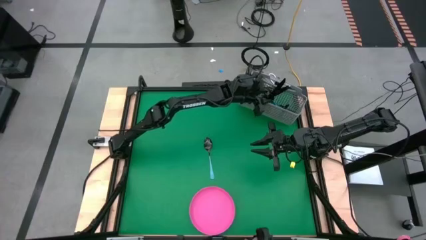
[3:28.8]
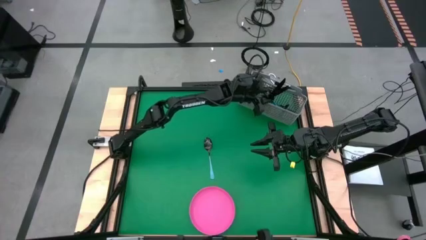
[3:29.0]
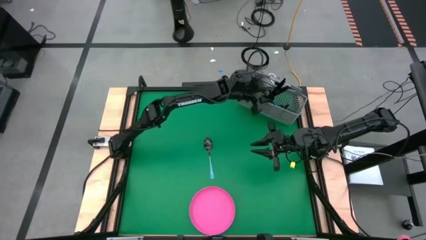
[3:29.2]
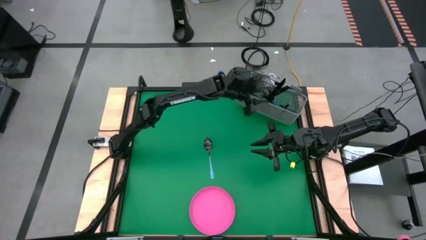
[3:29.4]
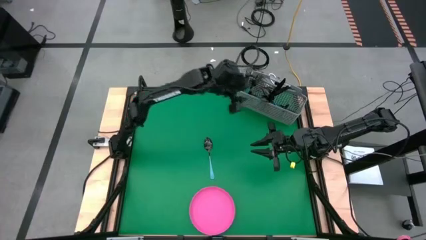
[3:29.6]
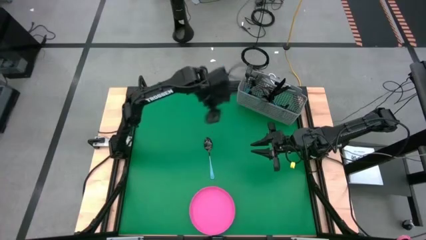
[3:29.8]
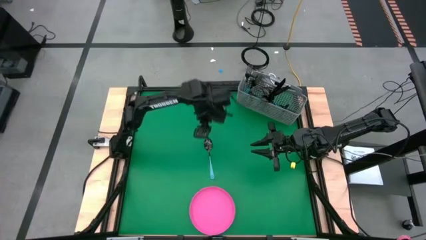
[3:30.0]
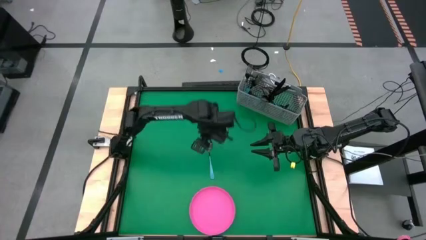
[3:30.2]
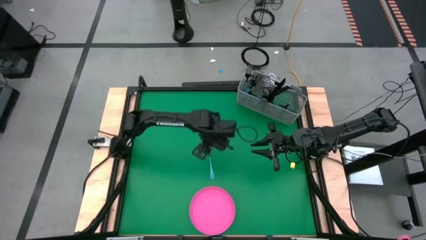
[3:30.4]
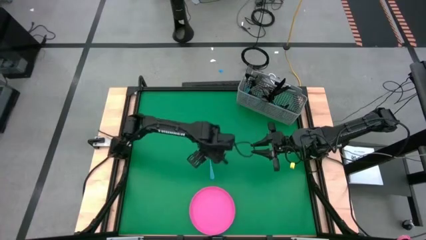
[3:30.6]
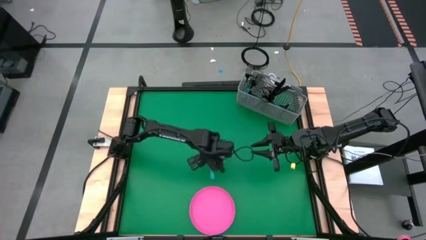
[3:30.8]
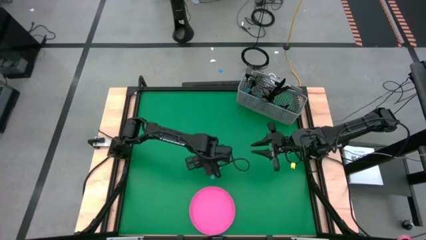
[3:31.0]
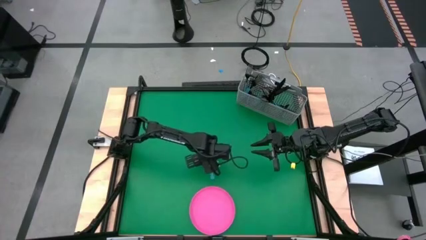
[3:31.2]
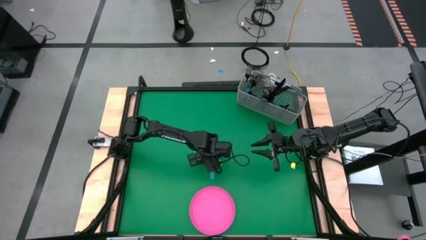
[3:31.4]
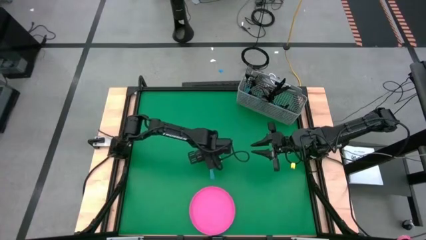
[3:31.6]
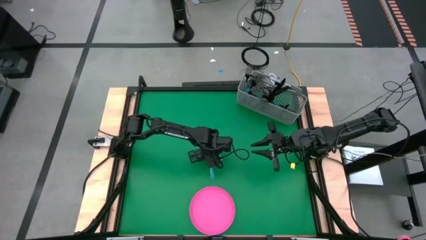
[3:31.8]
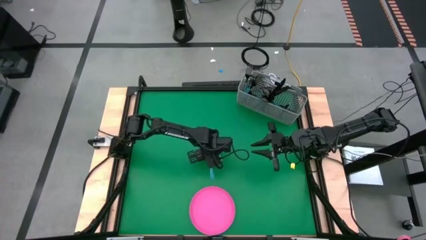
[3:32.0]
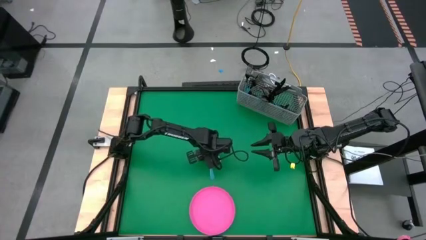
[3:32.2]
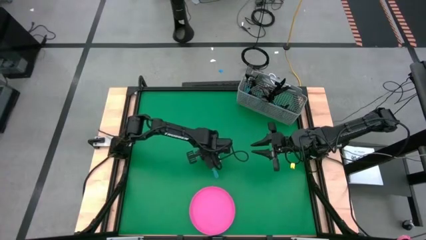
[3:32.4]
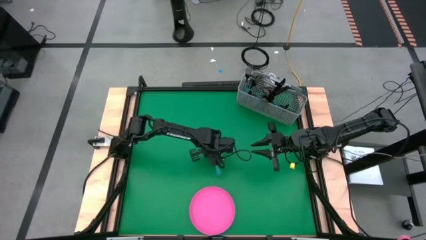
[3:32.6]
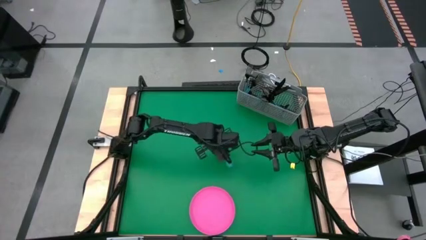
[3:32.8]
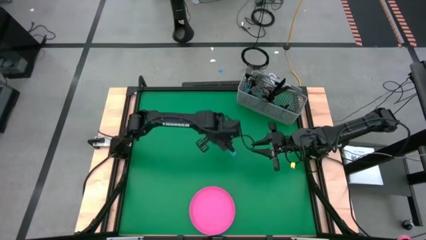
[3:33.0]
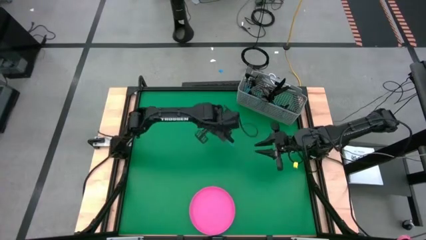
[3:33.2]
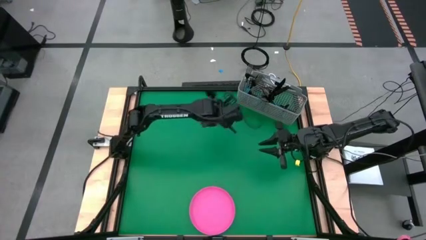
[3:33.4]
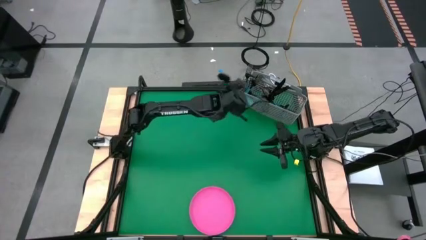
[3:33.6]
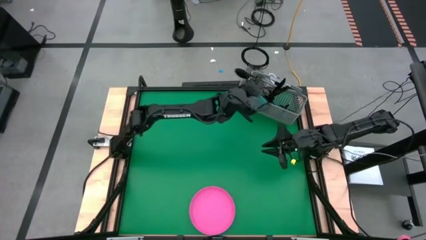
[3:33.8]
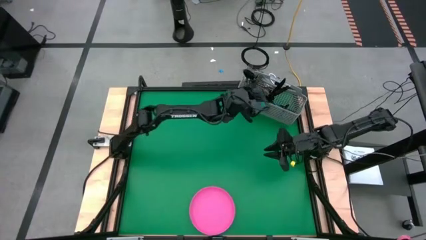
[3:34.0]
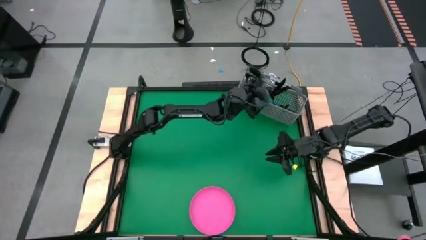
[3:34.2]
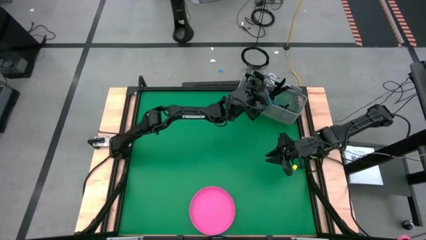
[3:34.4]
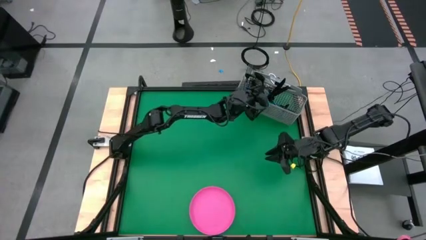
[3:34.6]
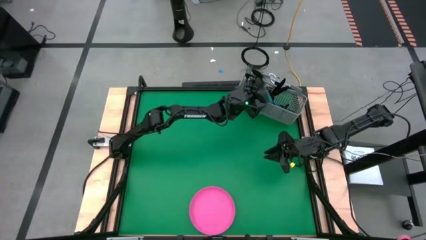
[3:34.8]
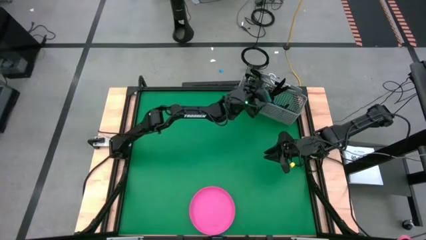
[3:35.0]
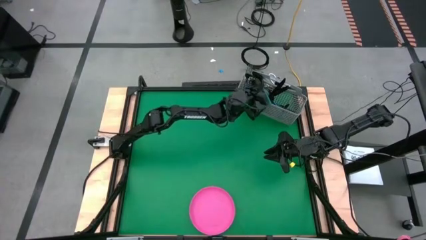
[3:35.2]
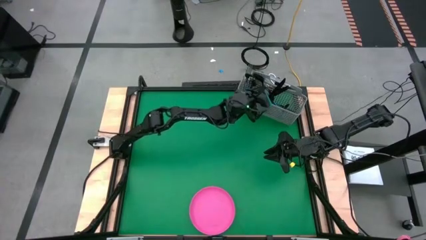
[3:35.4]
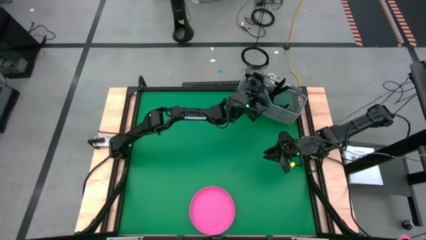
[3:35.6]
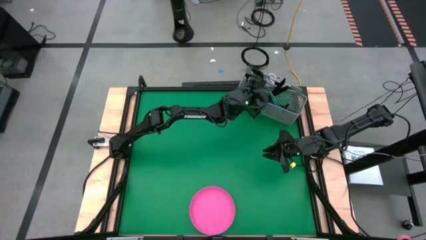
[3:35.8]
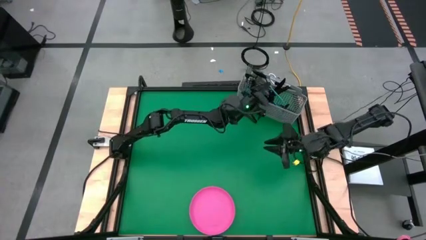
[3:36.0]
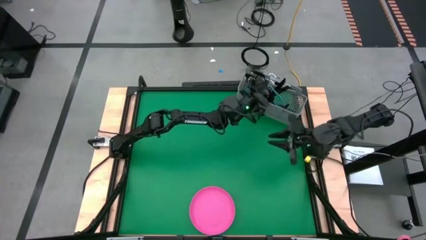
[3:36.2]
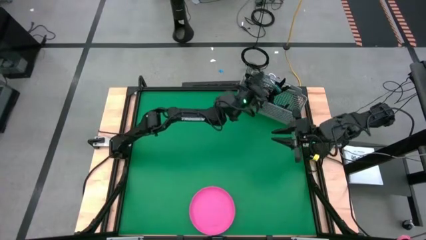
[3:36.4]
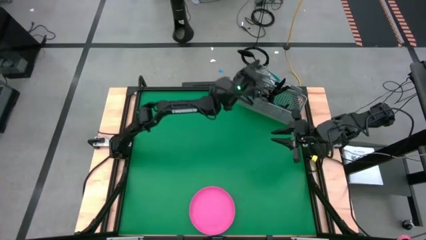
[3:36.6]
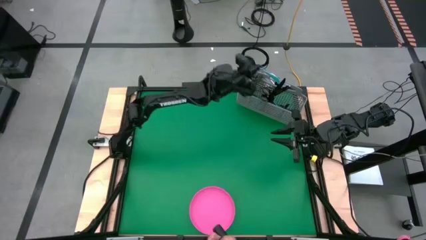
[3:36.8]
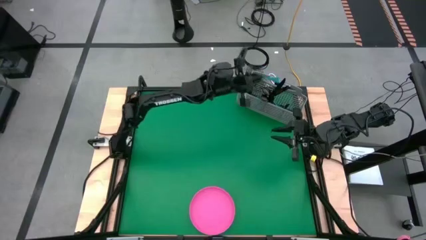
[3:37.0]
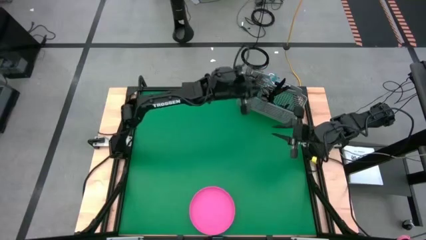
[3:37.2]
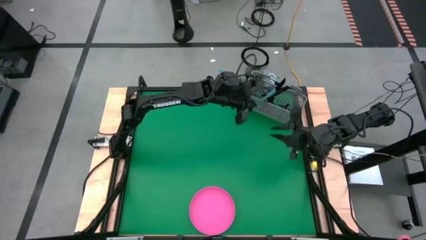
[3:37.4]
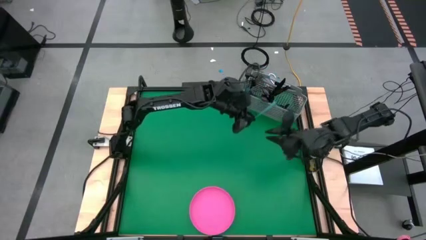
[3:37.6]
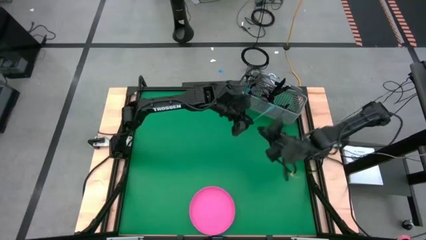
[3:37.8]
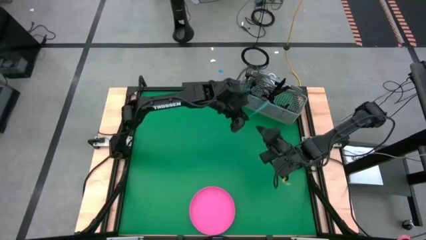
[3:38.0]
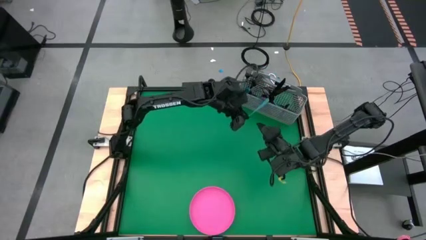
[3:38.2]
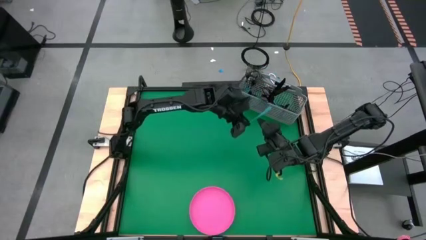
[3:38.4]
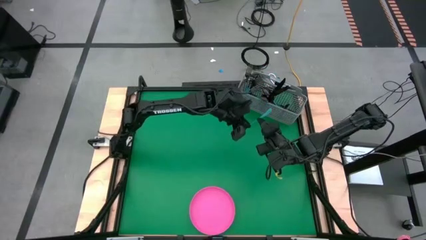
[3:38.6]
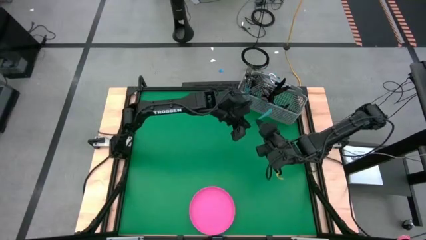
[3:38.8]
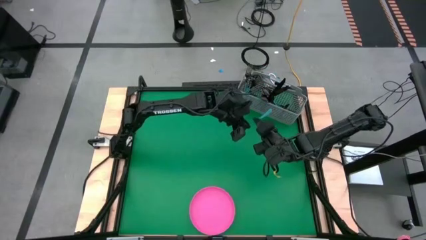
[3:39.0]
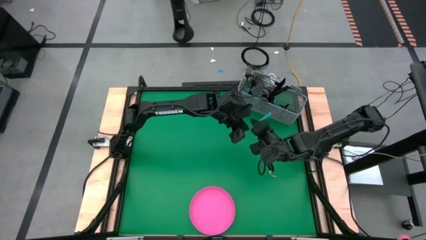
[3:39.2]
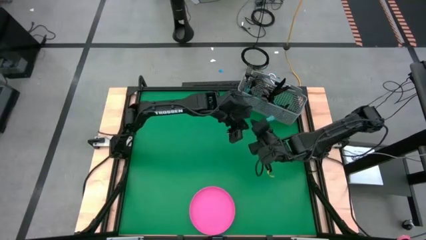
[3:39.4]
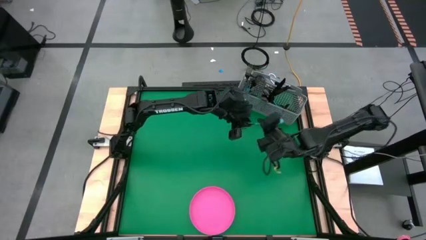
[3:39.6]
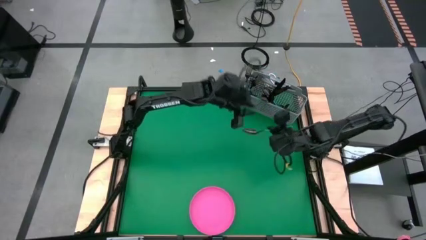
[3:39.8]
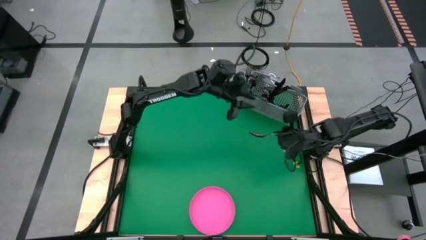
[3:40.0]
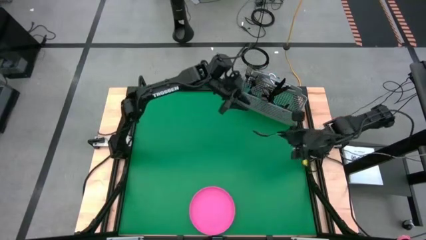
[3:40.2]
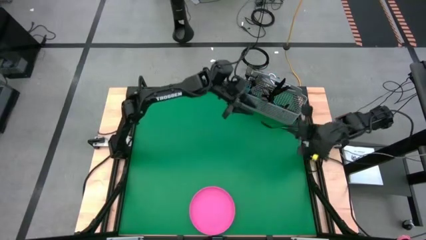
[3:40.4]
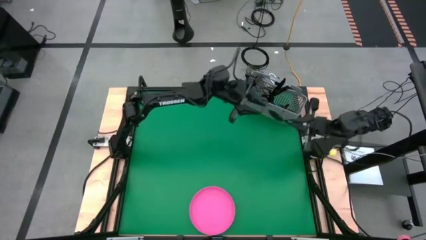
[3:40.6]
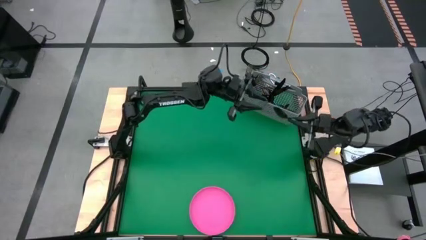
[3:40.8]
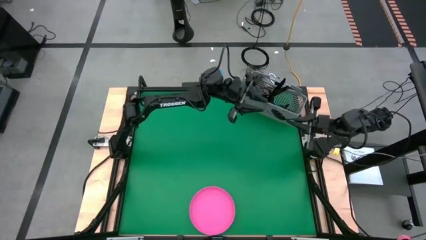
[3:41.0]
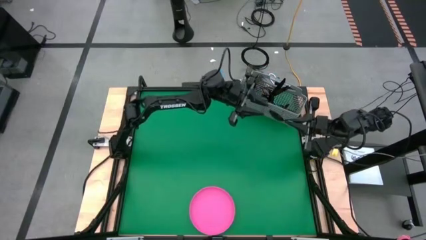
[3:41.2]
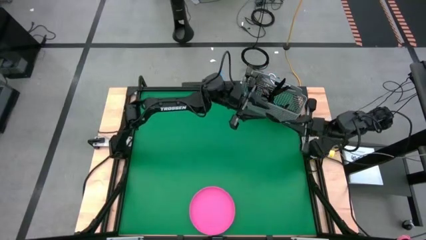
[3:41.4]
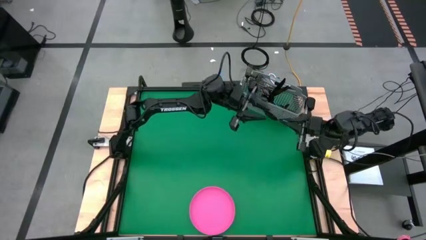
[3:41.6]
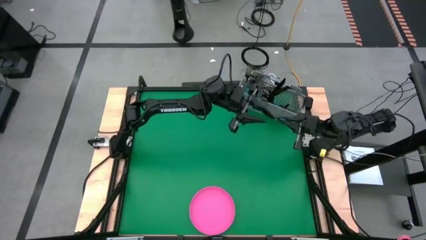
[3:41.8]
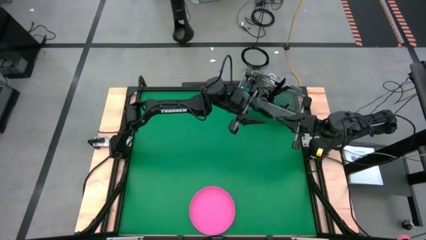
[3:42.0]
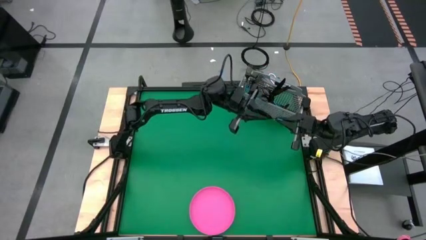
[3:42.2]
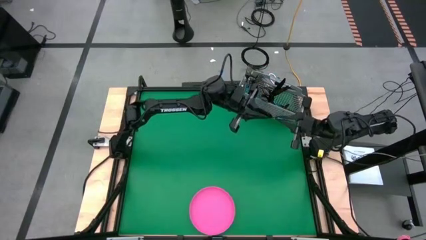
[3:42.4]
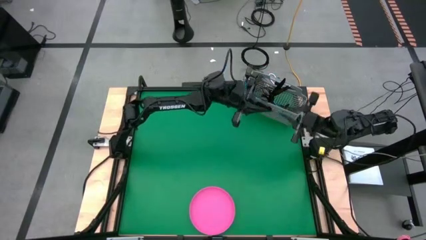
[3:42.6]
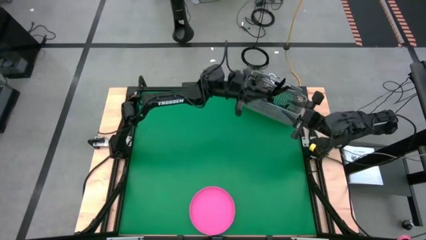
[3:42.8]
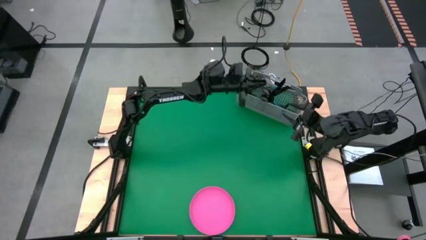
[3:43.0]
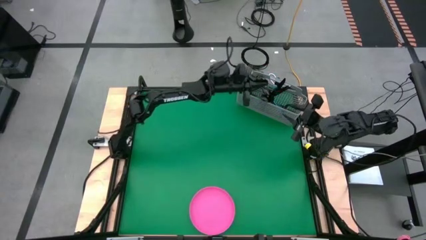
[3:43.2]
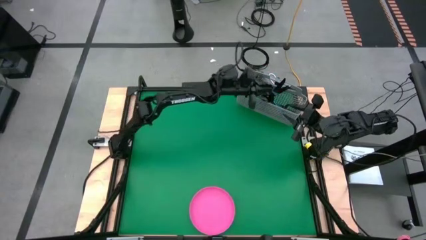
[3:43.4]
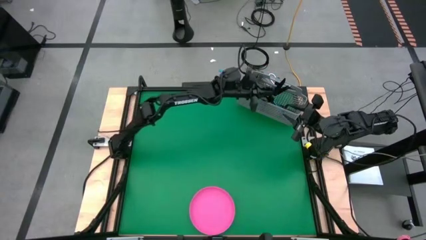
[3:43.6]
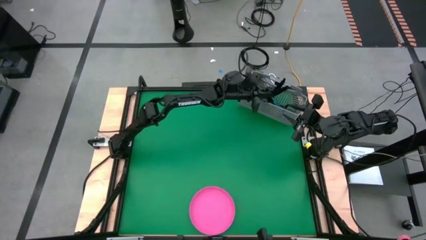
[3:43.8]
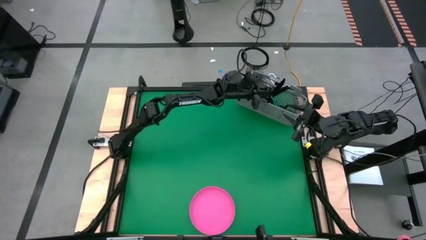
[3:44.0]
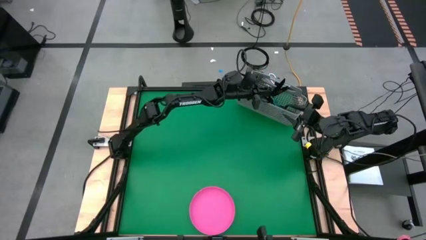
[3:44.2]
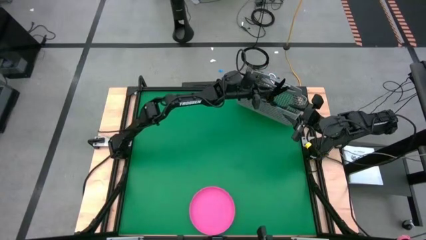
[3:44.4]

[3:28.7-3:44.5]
Task: Sort silverware
Put the blue spoon into the utensil holder
